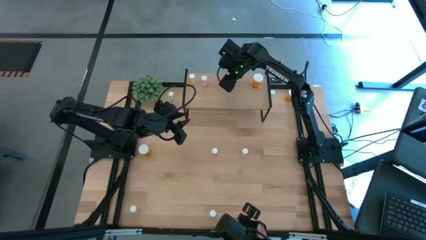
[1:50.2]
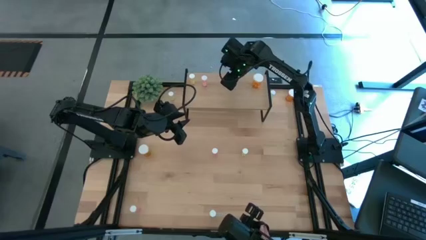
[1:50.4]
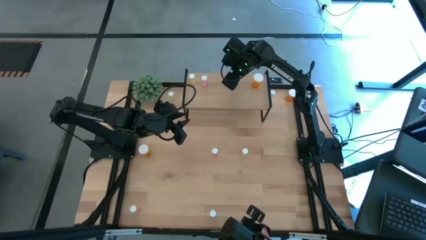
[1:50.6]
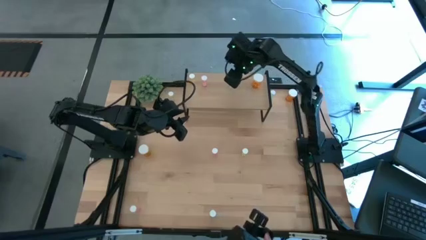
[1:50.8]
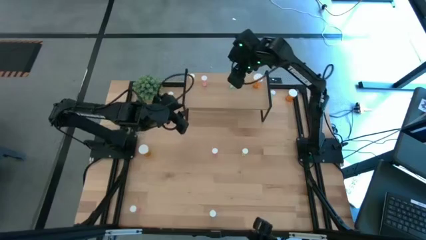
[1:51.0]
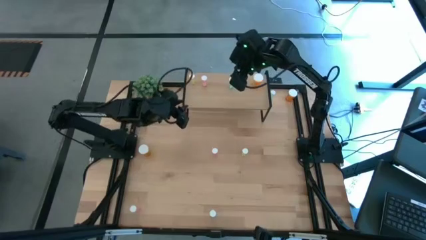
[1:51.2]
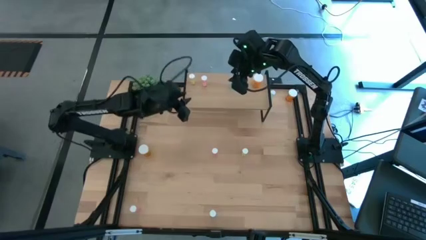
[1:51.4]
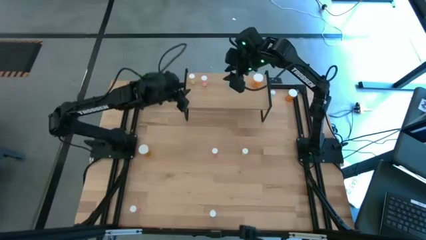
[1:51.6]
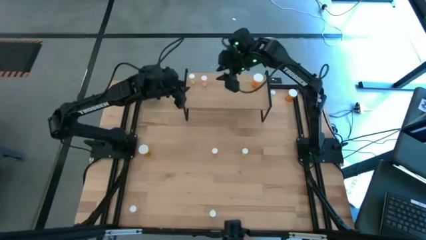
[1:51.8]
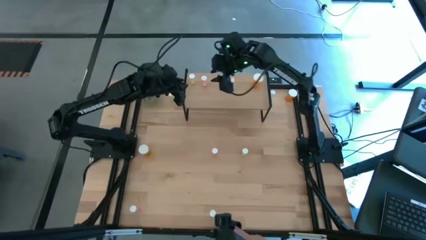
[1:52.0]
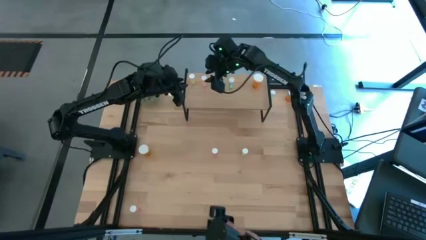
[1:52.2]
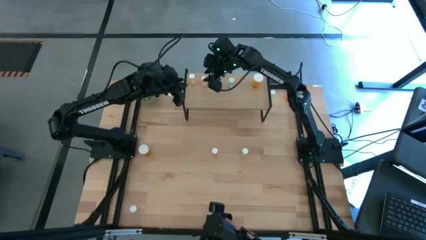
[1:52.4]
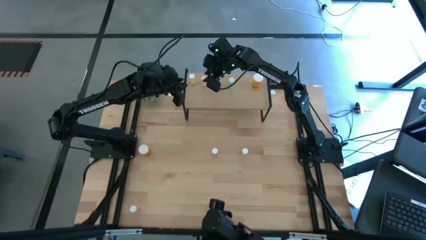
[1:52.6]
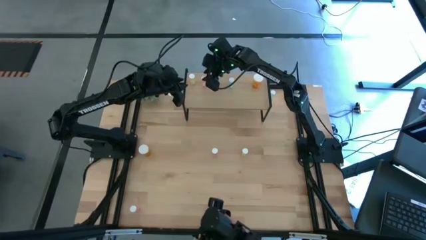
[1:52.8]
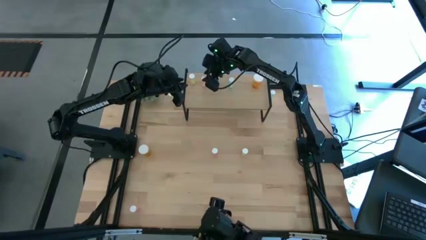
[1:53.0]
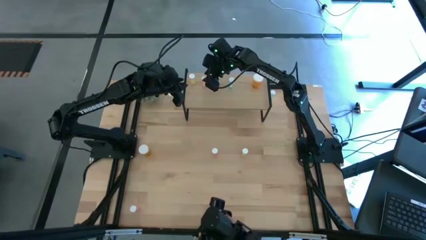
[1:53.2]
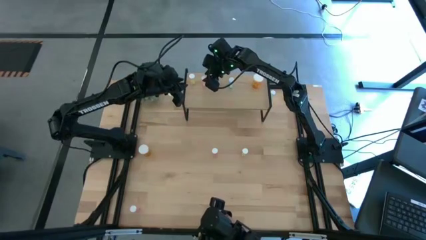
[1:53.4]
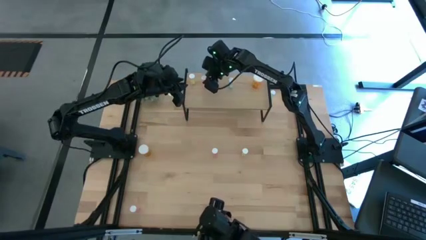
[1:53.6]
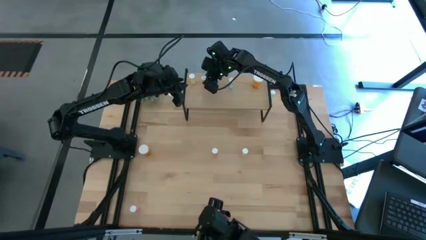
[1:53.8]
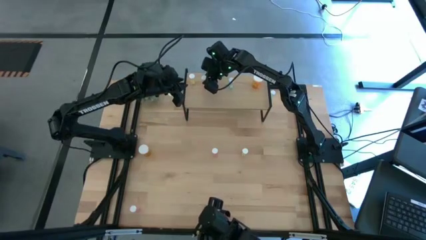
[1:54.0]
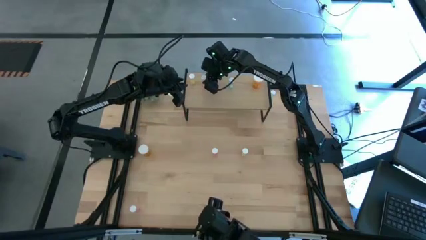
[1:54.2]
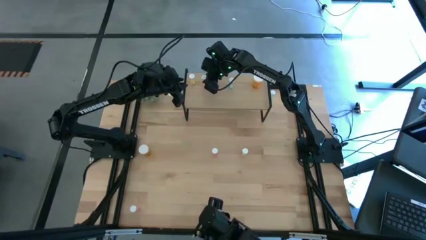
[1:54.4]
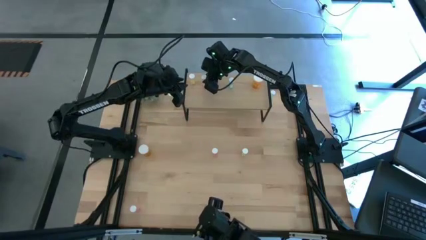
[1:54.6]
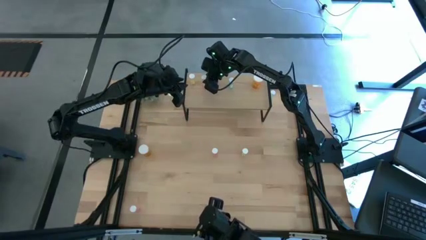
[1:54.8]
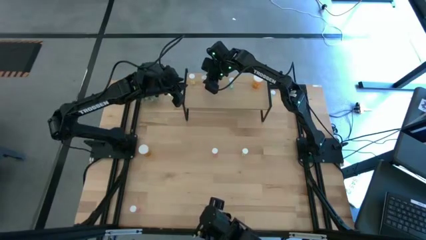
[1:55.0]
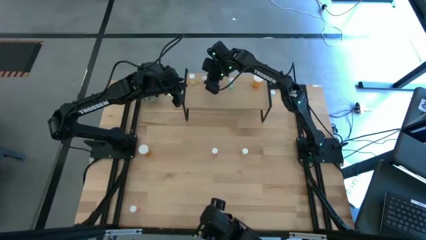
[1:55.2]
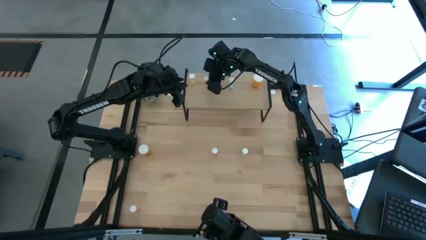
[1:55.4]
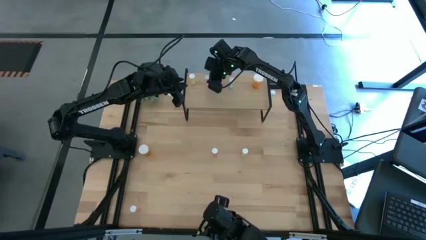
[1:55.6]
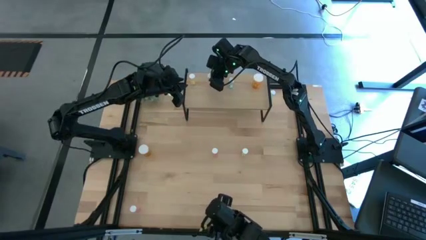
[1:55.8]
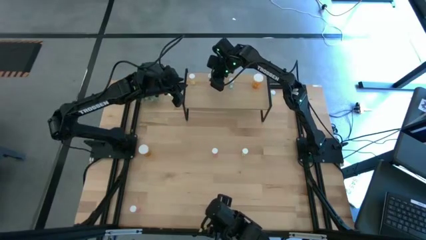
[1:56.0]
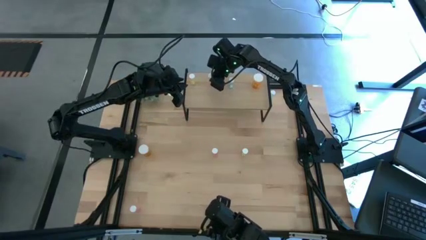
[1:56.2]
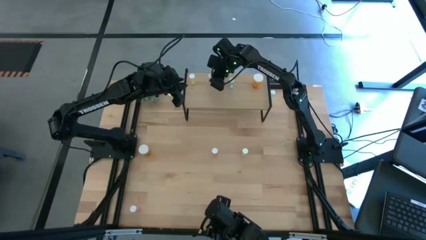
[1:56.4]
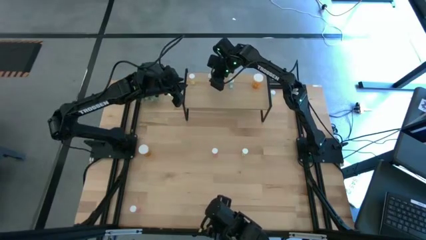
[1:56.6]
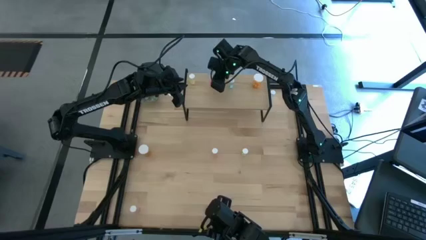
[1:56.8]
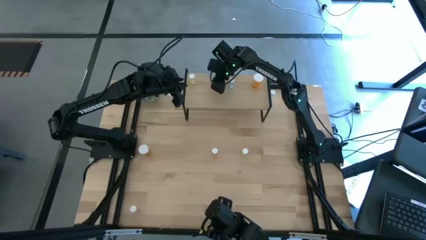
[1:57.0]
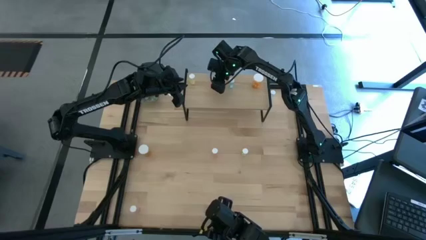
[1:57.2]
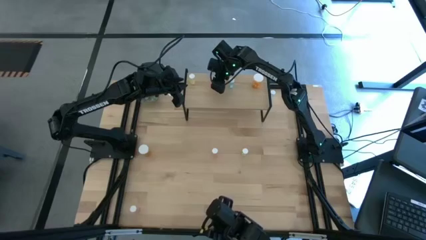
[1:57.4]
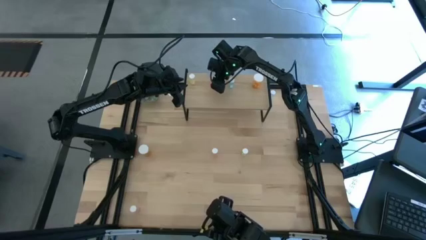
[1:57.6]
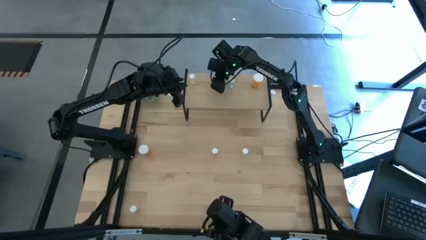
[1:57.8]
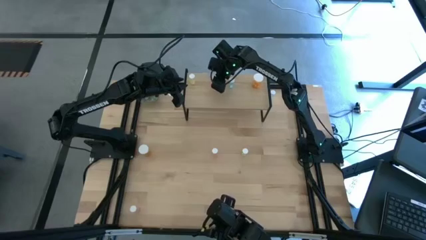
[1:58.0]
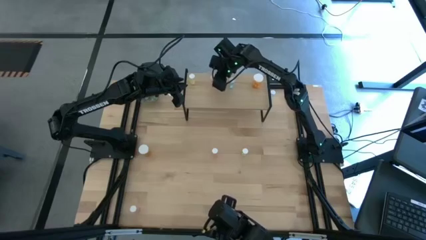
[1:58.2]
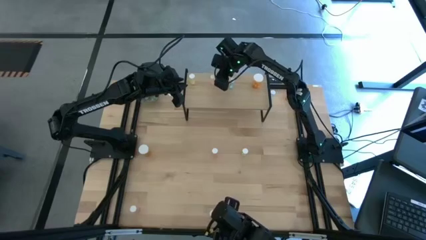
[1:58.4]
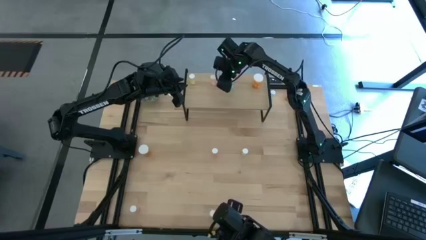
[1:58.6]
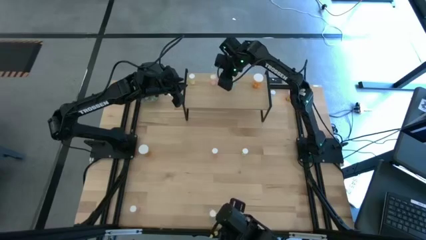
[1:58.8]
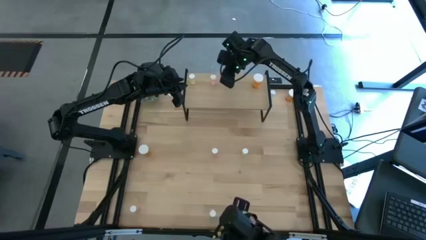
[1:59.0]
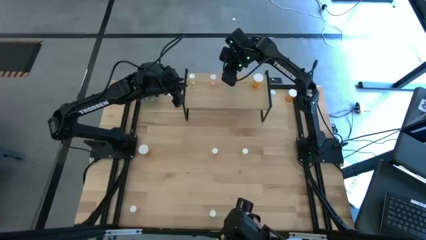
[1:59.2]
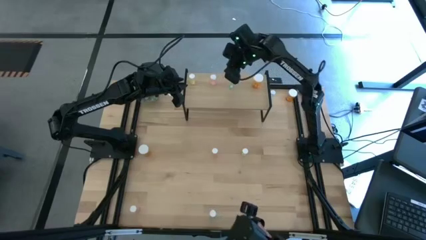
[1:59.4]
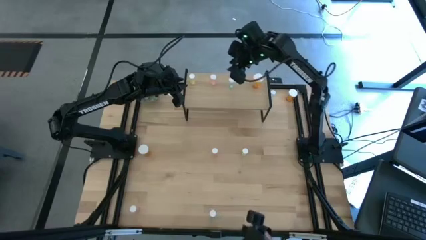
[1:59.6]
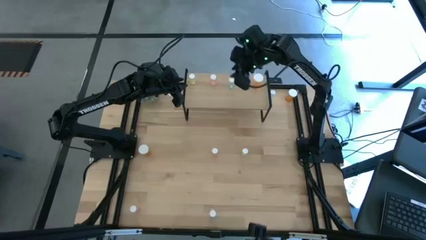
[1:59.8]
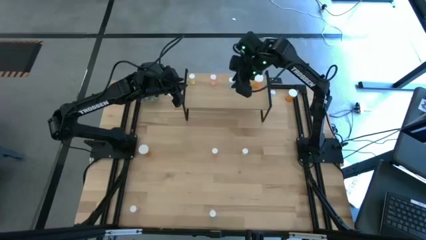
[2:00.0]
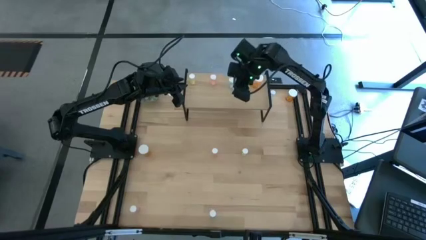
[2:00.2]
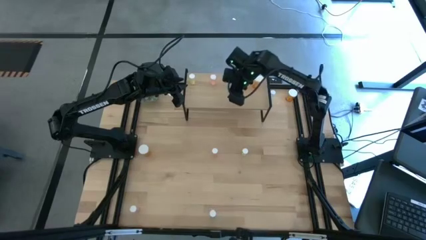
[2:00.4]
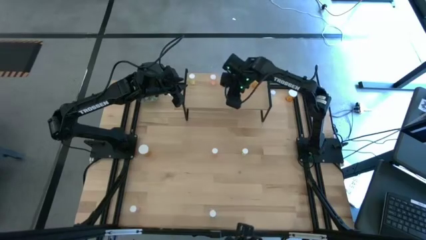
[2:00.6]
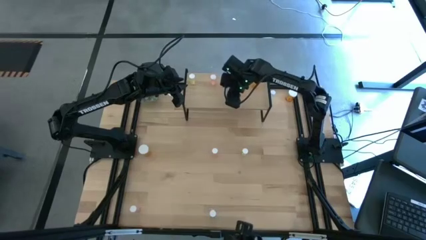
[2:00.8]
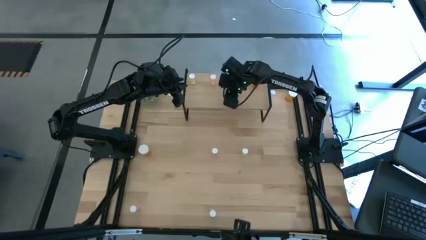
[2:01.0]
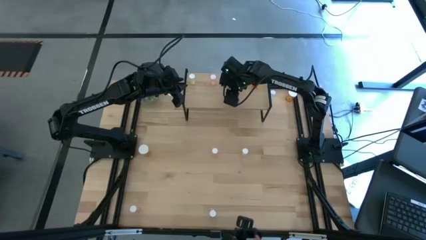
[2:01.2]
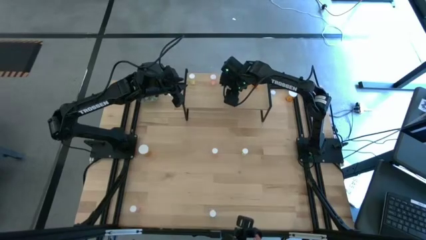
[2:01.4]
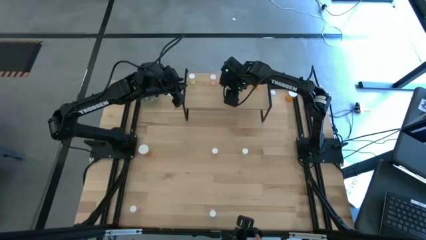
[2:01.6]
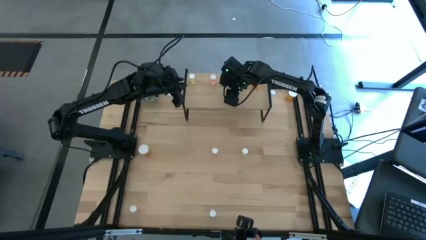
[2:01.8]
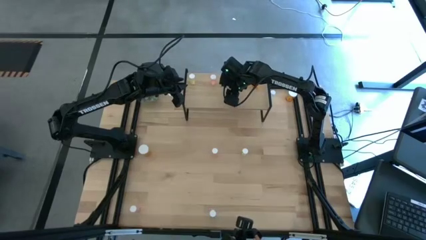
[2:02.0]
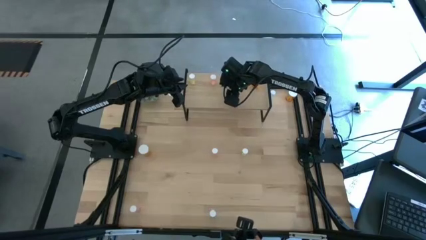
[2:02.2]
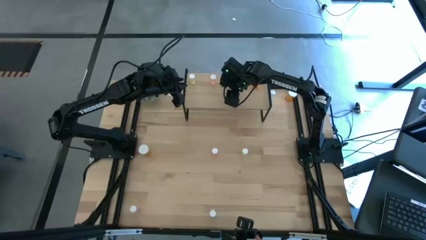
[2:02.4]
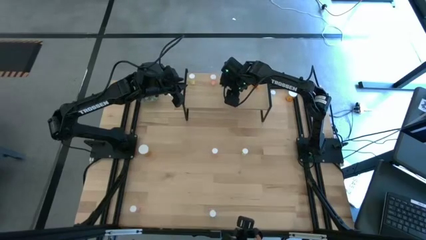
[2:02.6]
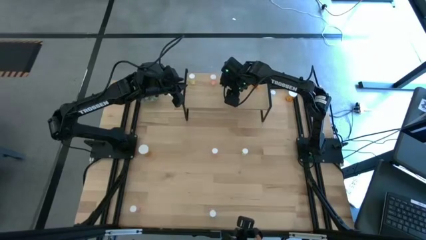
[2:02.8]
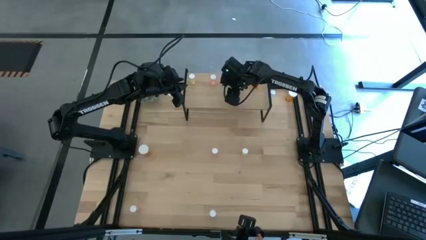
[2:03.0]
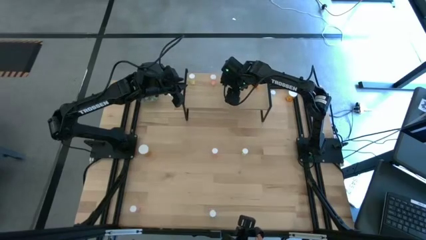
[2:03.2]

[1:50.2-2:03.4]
Task: Pick and place medicine bottles onto shelf by color
Adjust the pill bottles on the shelf

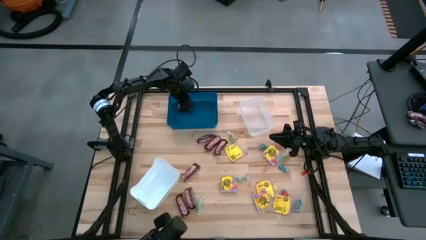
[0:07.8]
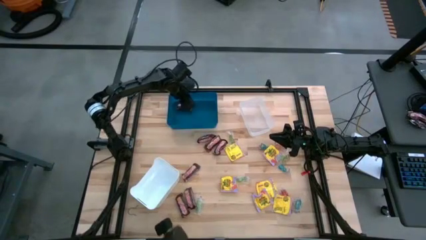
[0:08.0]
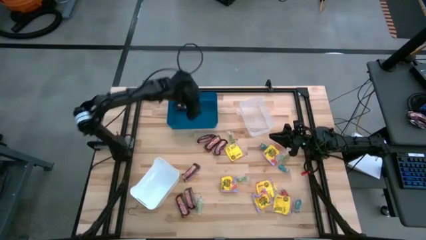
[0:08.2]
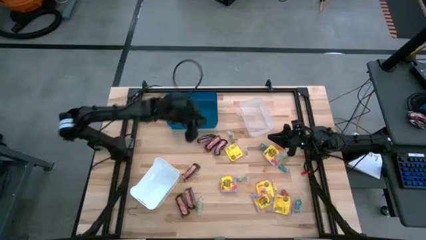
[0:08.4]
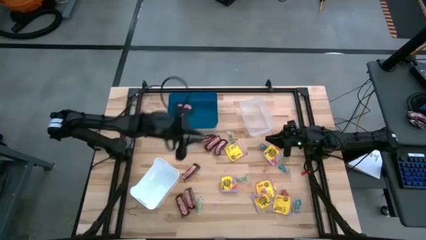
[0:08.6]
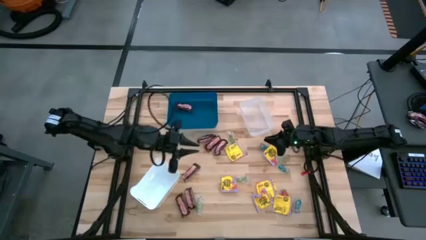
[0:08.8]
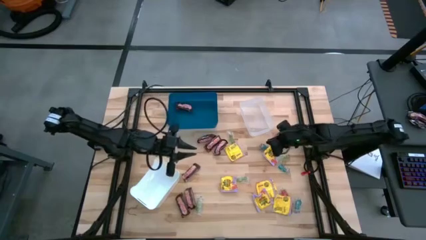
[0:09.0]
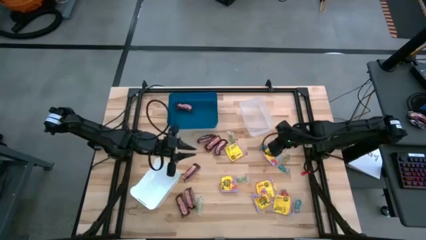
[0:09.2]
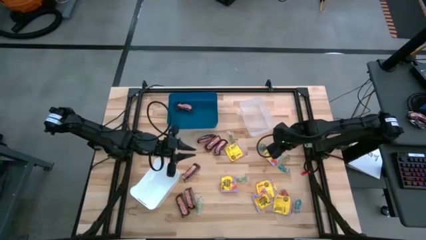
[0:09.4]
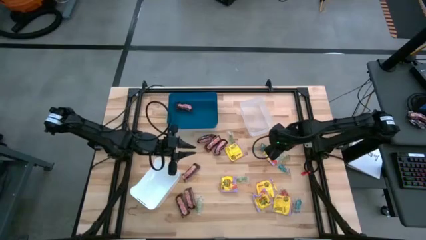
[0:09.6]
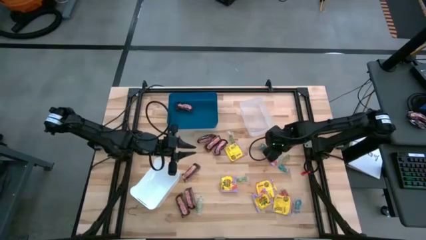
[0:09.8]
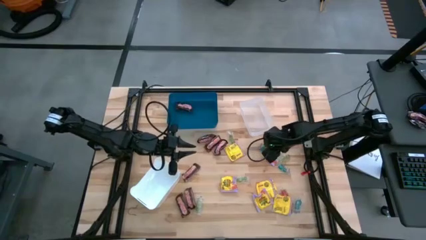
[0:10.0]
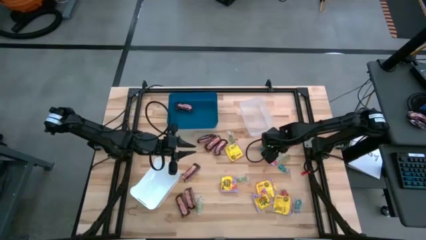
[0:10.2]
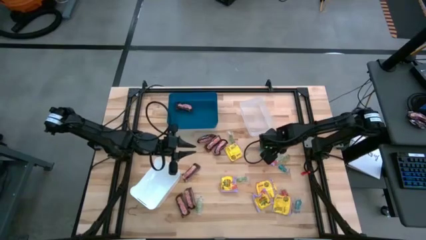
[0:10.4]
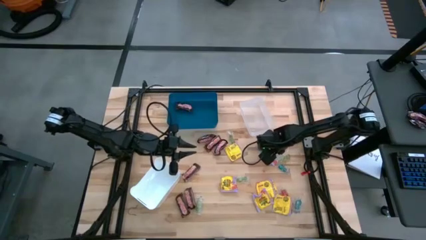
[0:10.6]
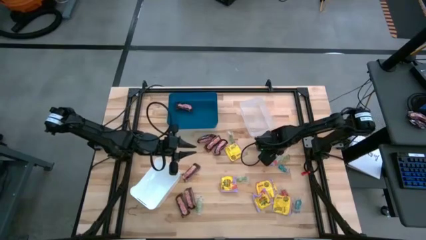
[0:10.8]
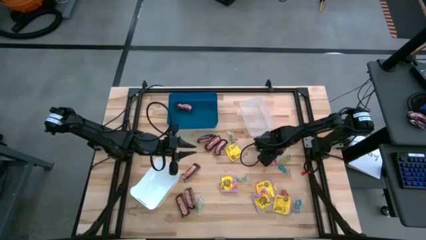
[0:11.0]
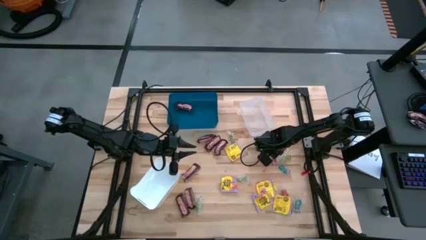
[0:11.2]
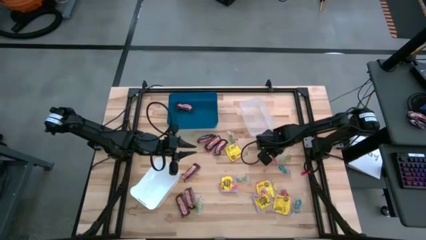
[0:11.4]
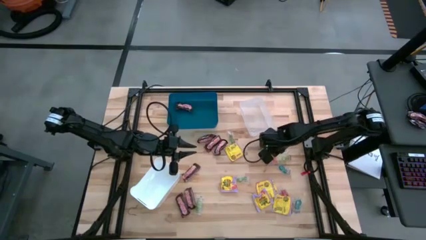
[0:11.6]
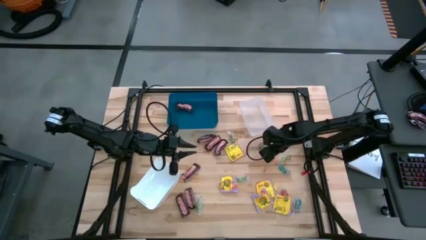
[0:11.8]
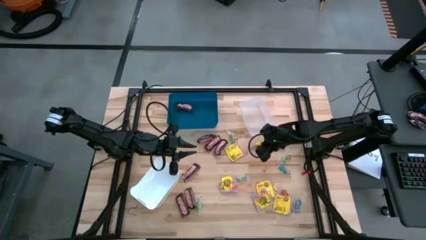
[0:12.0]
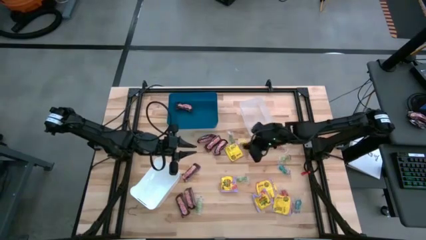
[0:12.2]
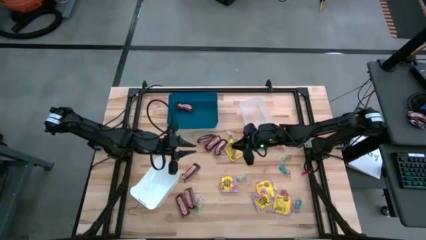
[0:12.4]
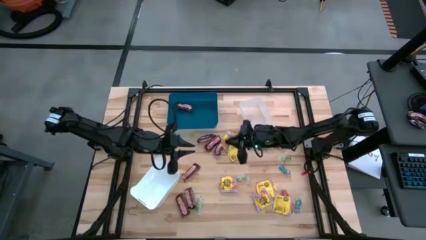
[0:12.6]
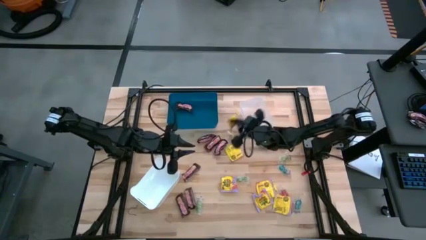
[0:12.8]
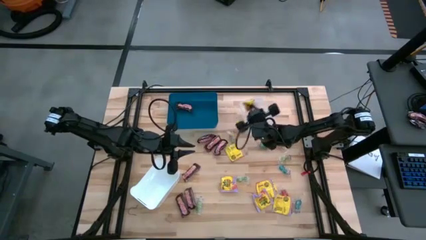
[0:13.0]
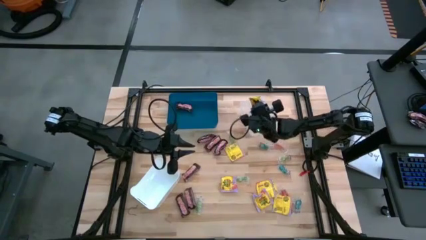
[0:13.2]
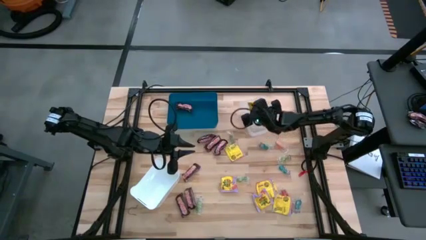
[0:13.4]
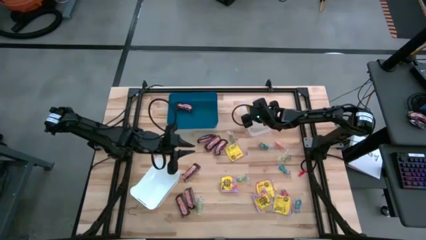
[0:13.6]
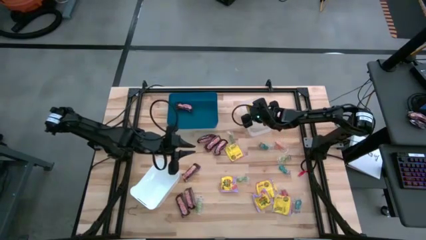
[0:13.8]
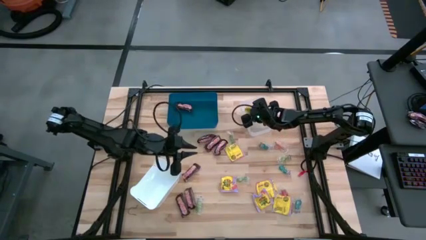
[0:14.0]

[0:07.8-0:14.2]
Task: Sort candy
Put the yellow candy into the transparent bin
